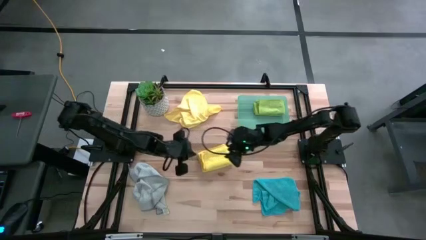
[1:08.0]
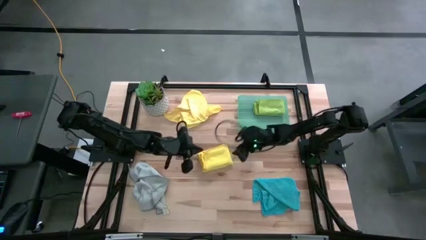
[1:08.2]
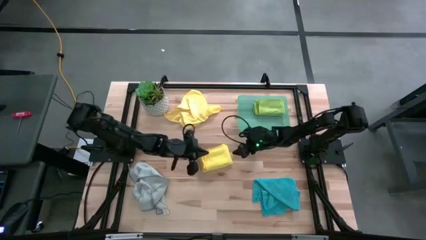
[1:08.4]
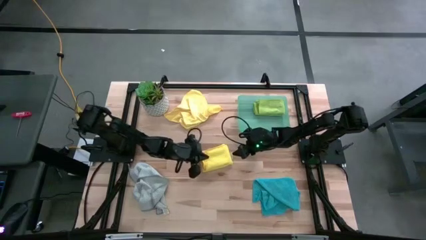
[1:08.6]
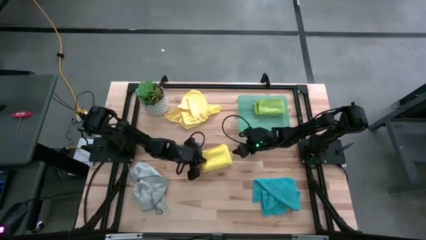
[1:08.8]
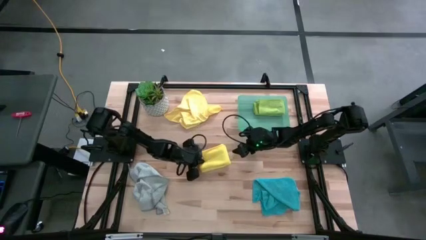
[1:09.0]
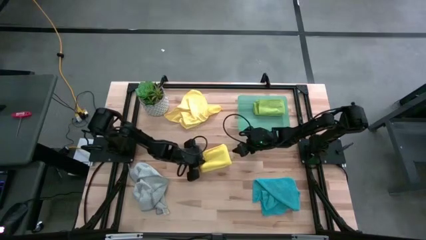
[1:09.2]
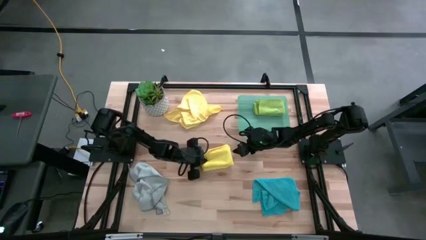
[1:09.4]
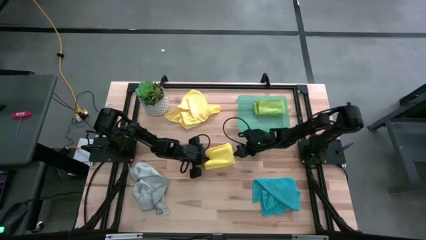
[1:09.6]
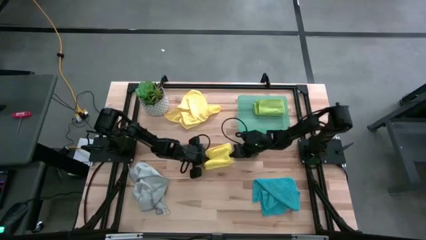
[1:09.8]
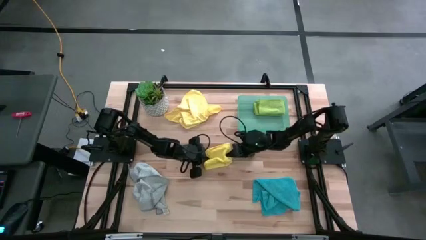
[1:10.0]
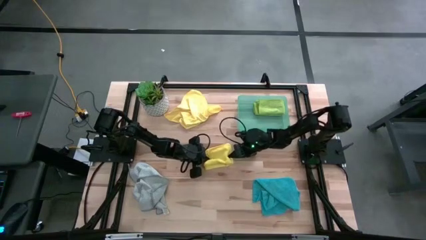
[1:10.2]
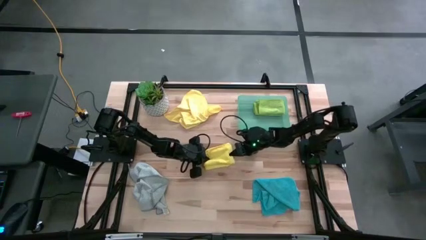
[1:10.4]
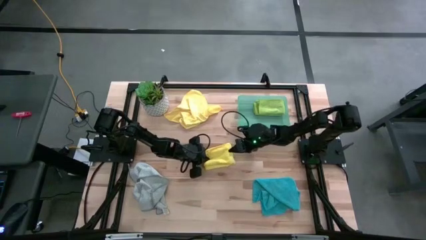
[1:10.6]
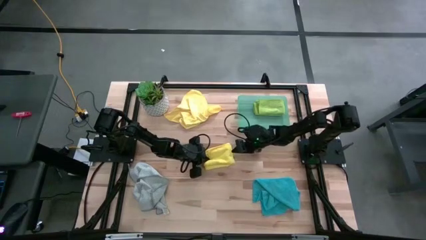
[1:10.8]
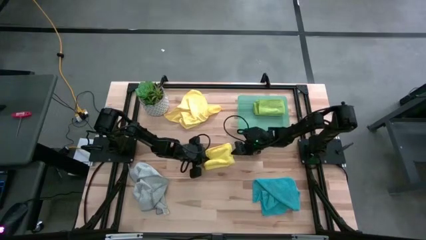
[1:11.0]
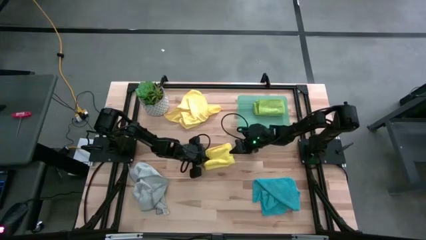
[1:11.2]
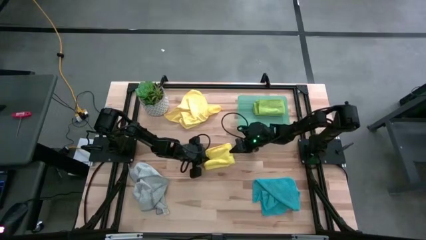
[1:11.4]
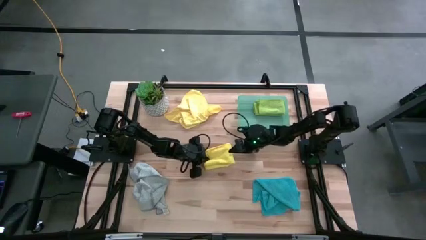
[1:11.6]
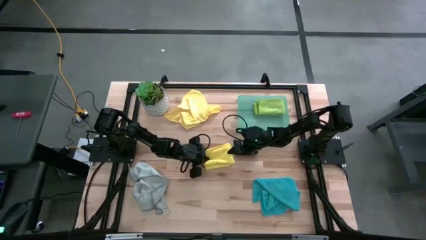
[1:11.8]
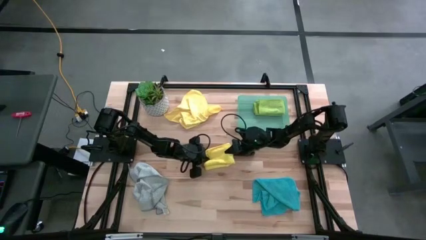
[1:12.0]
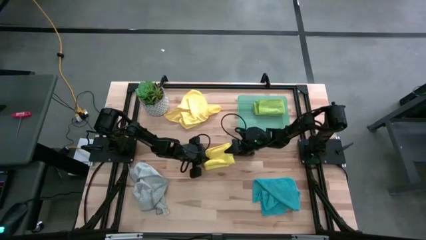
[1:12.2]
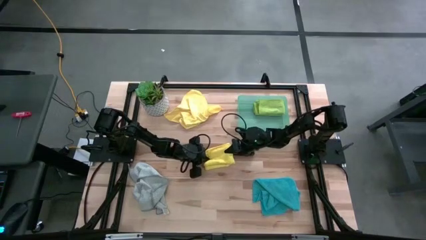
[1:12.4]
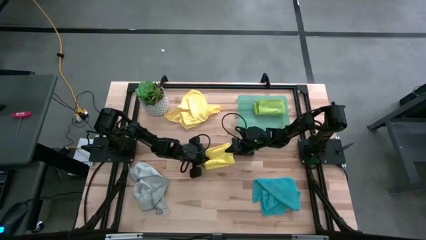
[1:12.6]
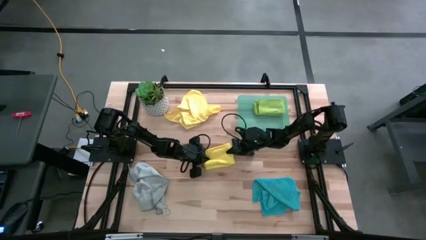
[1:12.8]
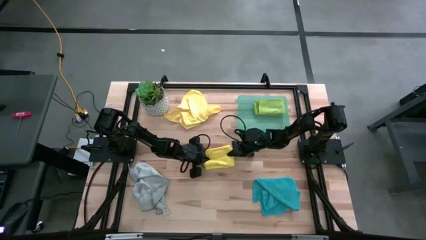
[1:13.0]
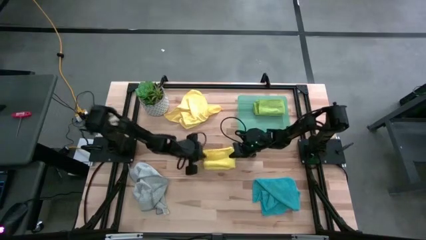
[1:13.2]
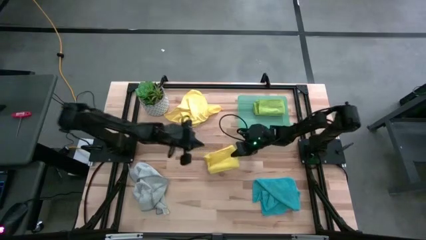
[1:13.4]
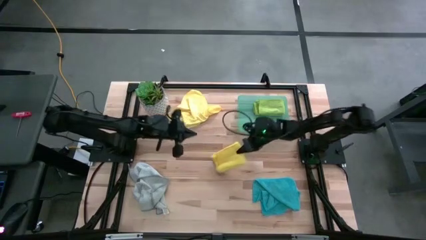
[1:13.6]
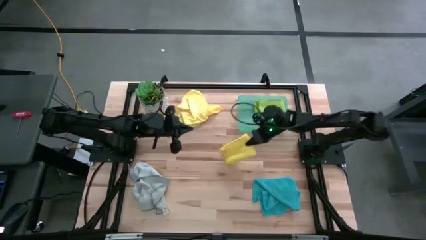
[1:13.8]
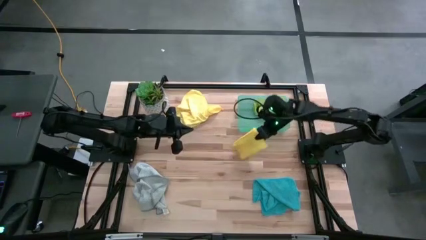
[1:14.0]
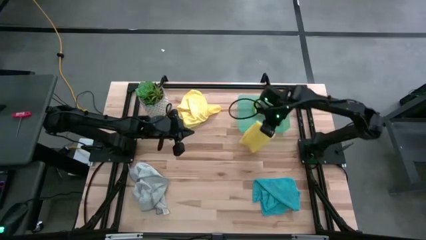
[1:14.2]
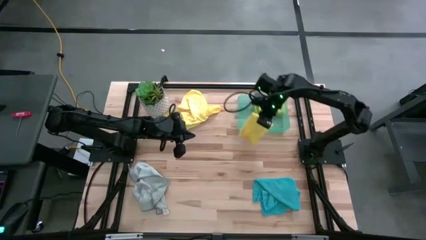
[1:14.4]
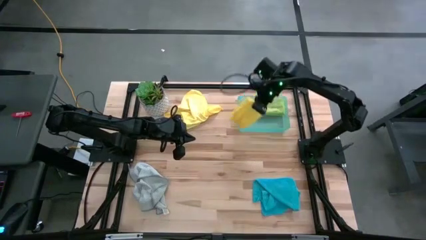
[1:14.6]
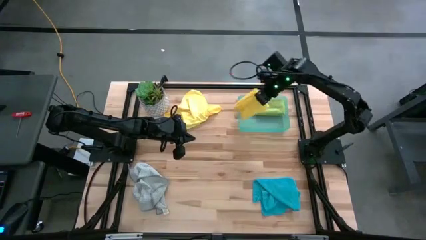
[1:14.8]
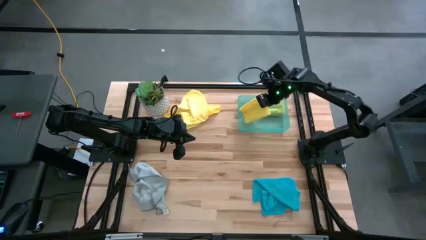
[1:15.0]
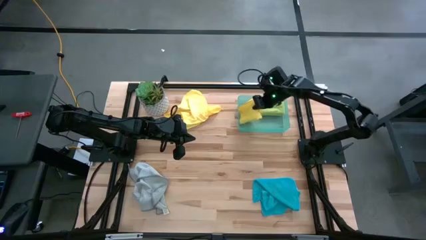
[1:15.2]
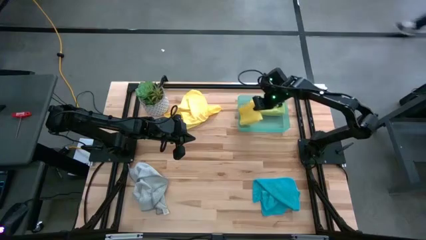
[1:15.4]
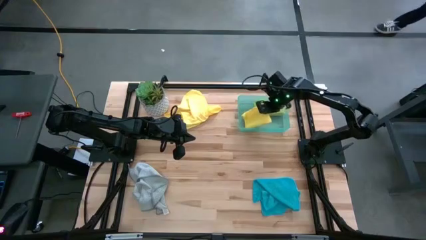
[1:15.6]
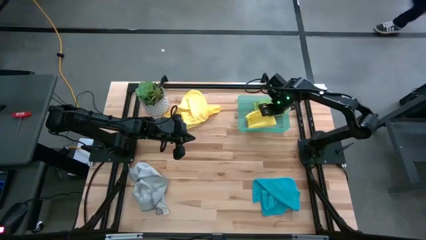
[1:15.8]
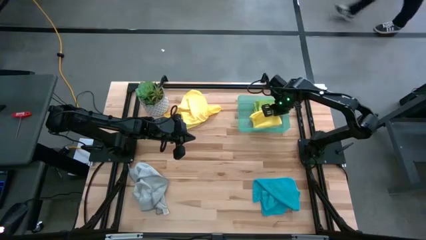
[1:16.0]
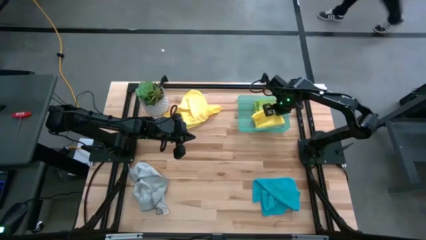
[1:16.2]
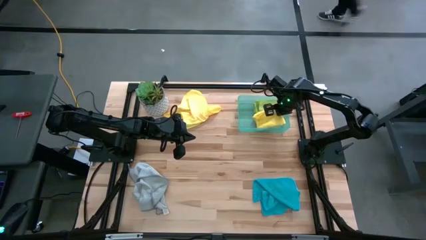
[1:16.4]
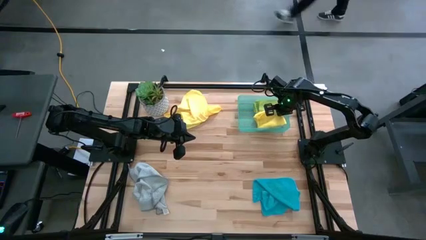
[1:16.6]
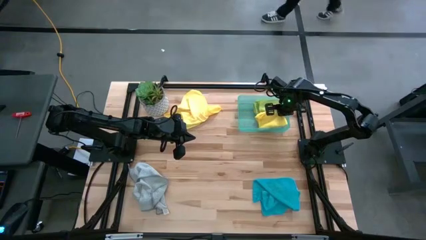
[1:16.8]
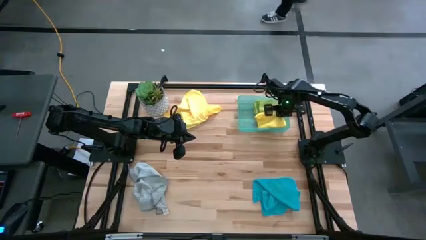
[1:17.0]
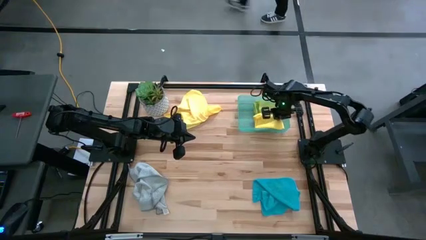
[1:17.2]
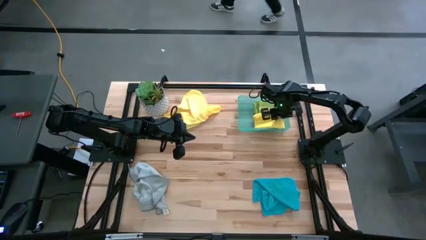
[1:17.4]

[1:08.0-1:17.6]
Task: Fold microfiber towels
Put the bottom yellow towel into the bin

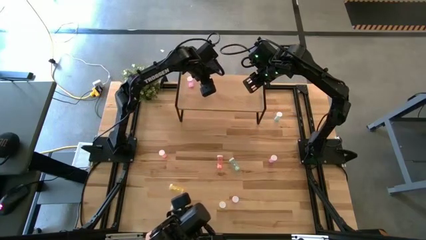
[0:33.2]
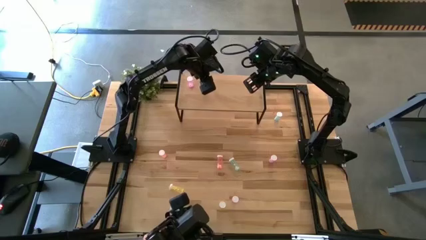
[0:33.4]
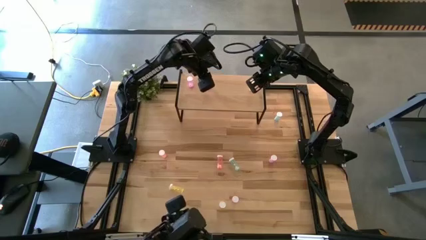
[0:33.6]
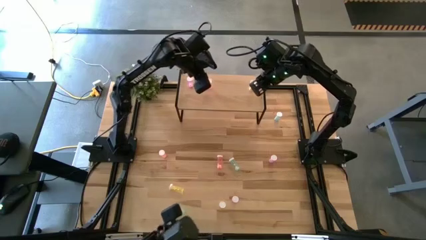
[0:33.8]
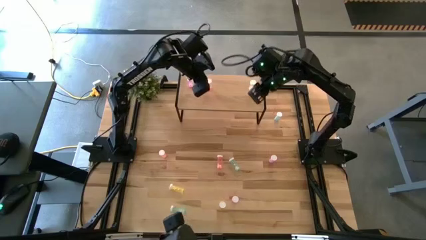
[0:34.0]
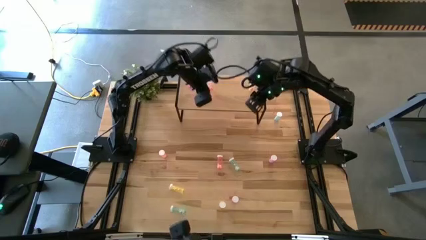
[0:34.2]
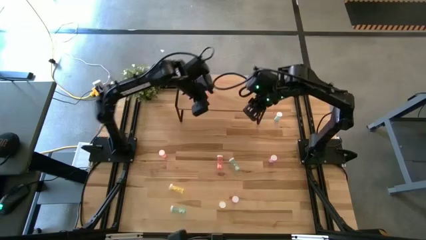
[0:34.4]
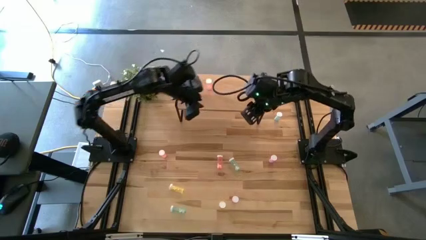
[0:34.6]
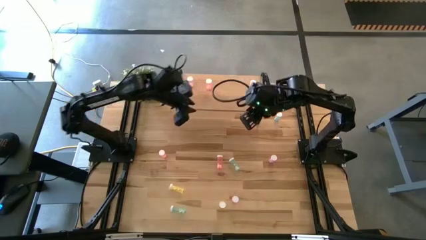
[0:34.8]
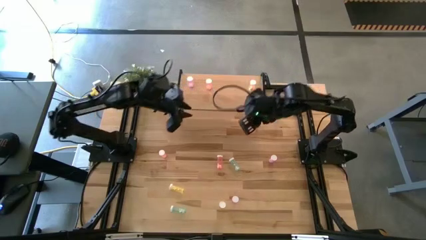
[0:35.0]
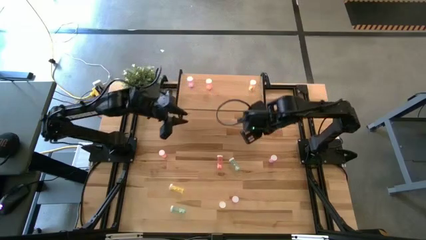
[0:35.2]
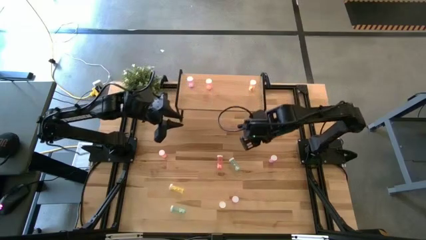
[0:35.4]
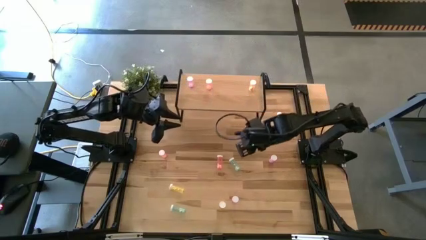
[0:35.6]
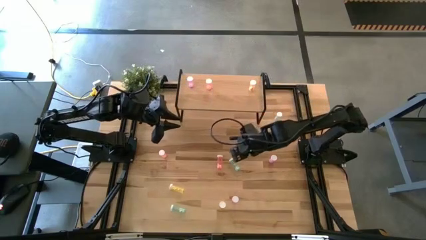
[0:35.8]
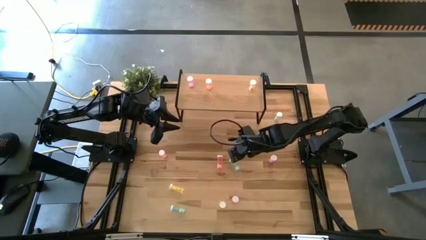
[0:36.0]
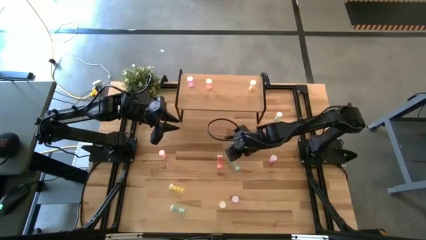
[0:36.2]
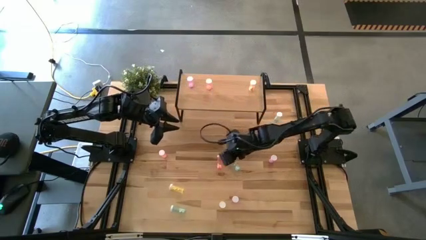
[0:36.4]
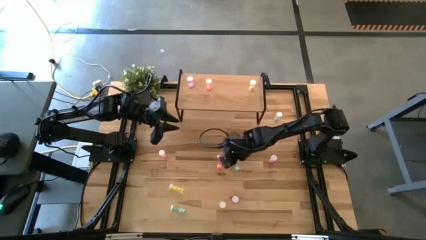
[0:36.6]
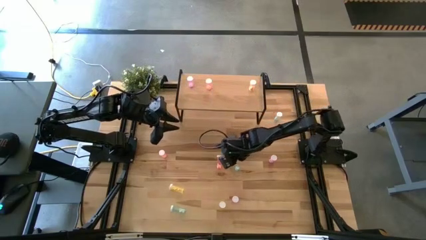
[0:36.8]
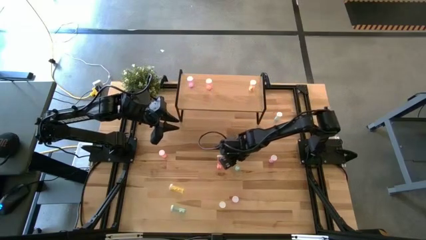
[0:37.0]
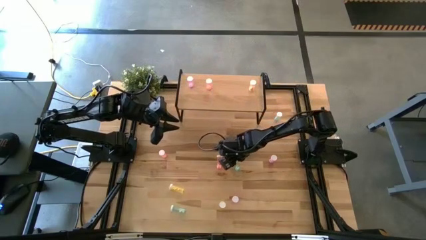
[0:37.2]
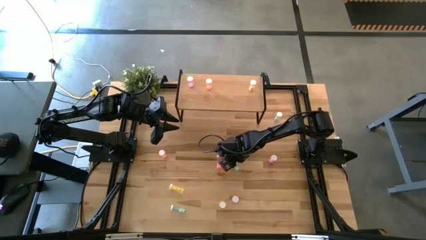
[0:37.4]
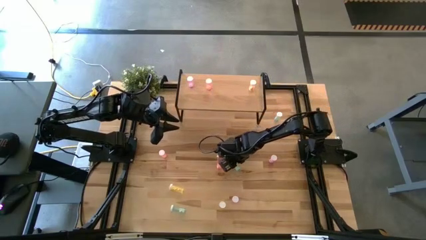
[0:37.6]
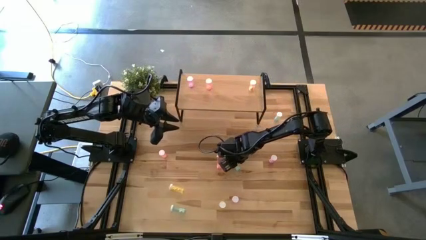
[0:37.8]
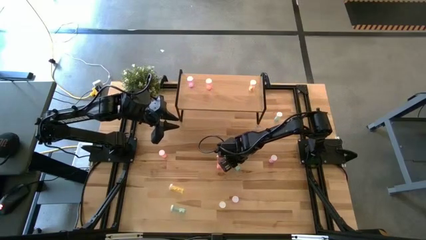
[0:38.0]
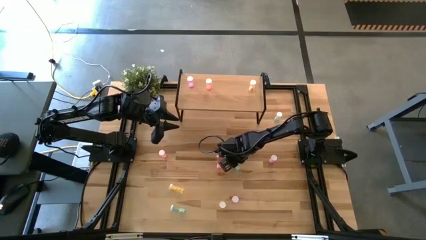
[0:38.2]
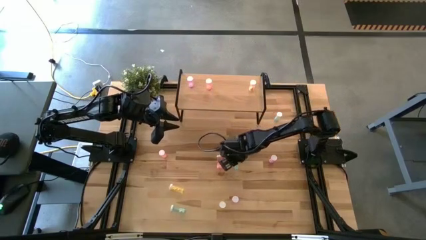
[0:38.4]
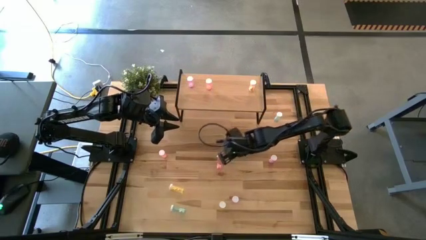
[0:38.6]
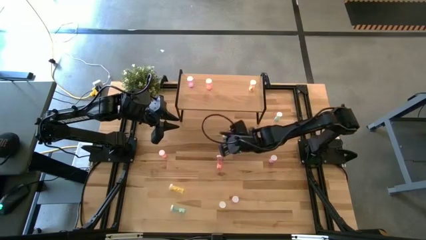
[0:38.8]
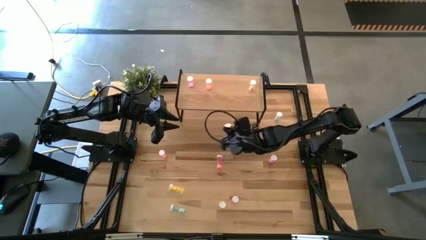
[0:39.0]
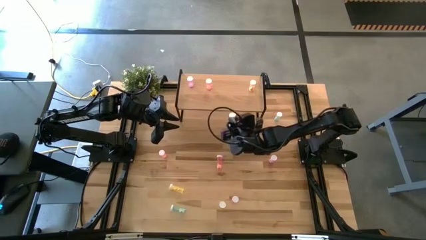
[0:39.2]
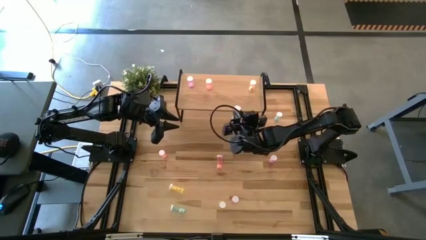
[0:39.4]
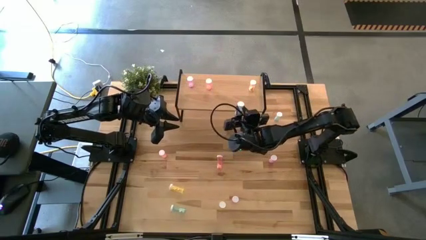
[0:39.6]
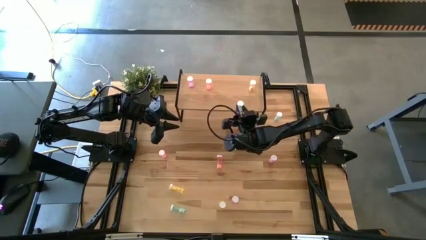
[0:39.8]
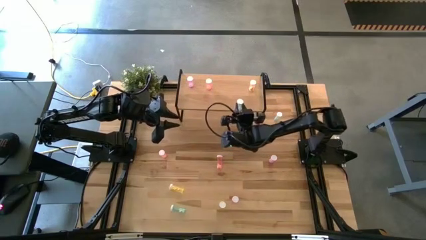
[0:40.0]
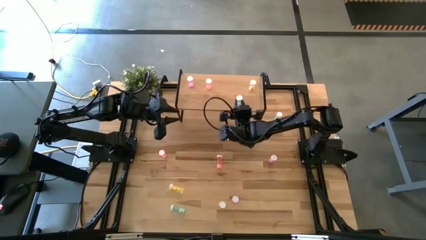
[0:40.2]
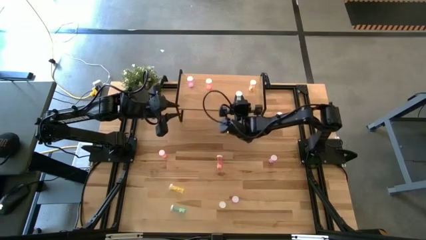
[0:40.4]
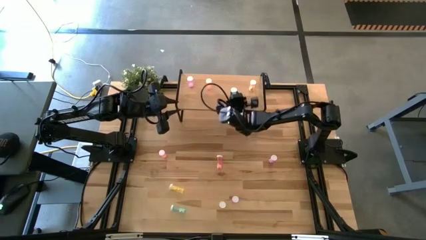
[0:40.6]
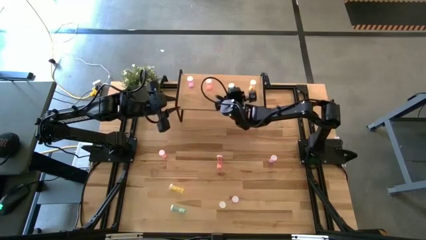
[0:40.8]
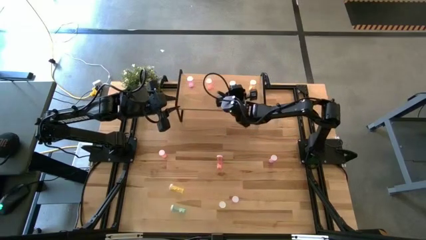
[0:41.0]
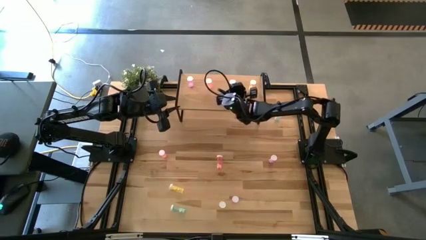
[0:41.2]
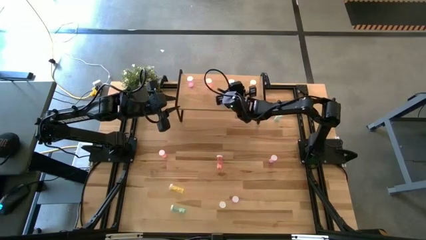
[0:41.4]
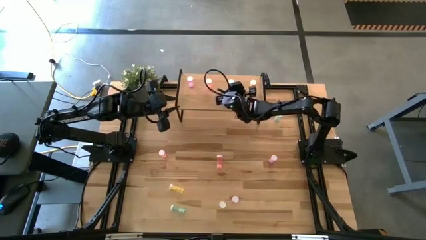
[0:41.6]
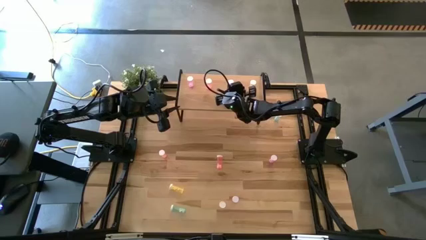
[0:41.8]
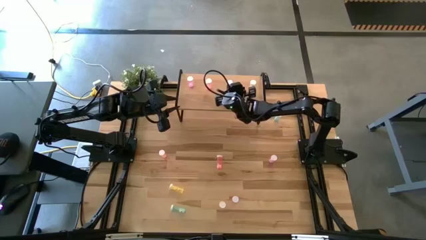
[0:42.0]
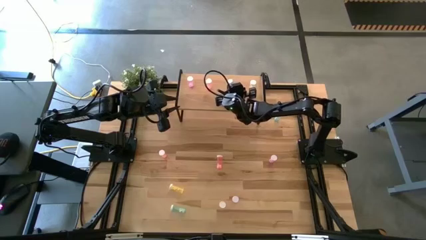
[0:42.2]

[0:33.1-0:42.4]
Task: Pick and place medicine bottles onto shelf by color
Put the middle blue pill bottle on the shelf
